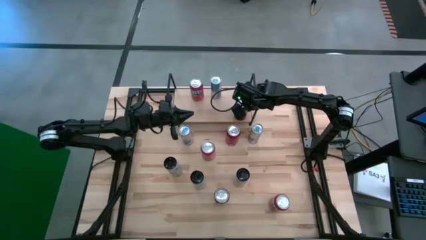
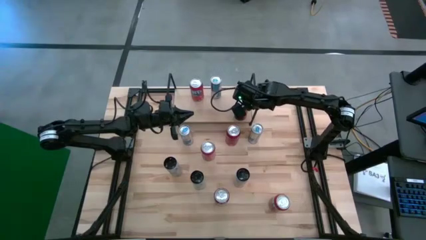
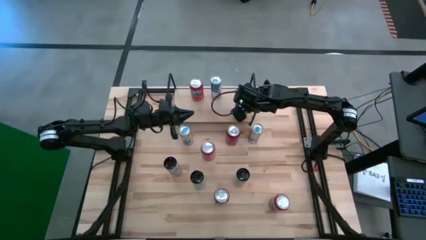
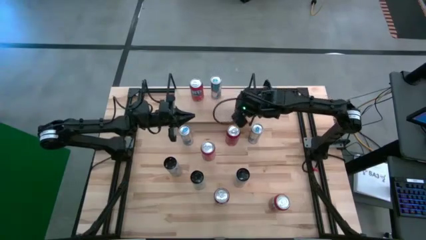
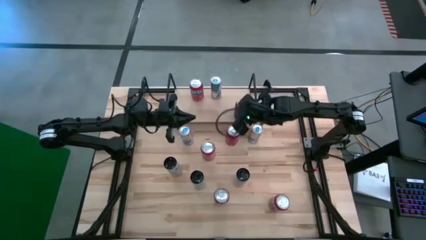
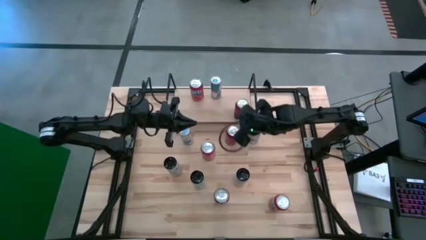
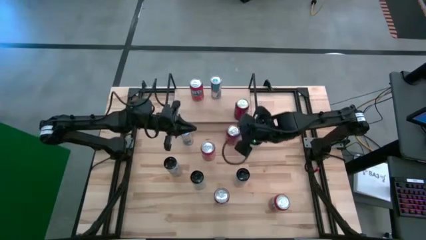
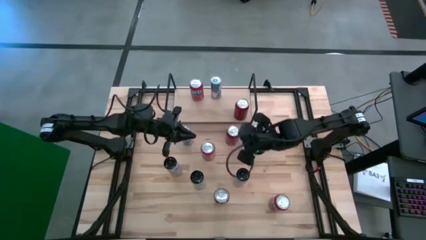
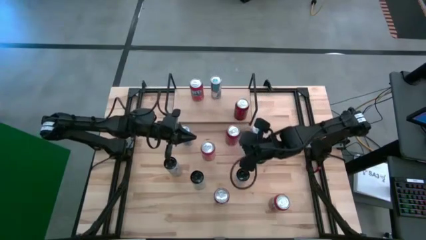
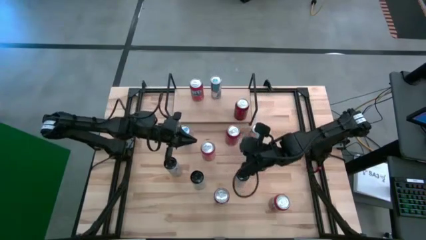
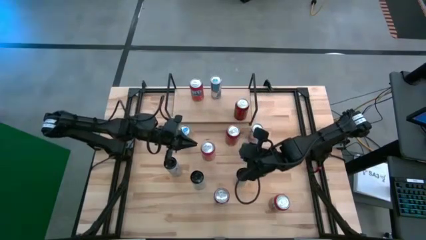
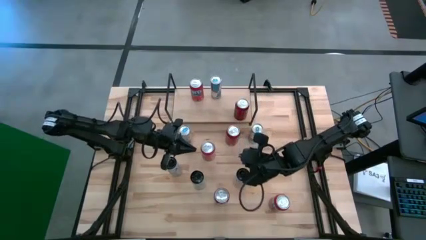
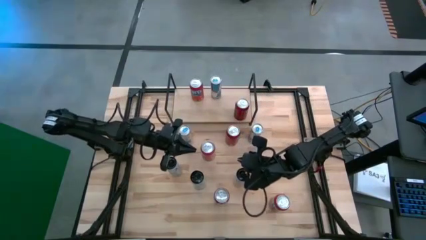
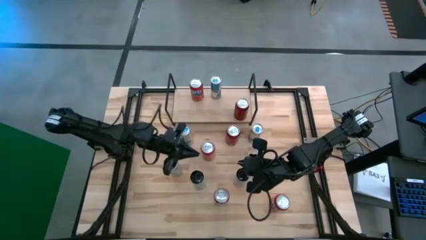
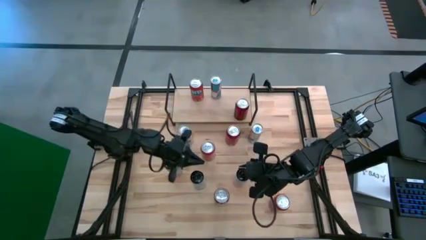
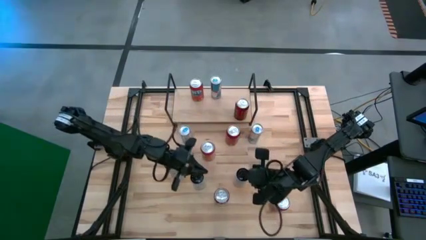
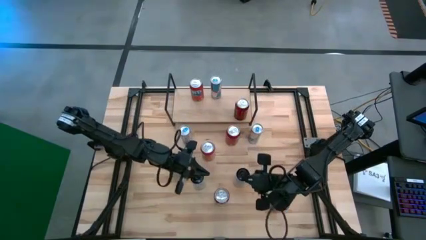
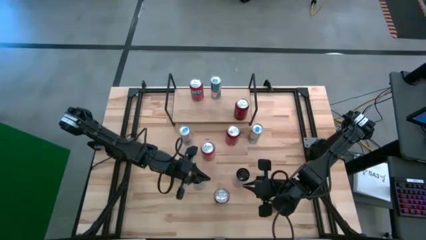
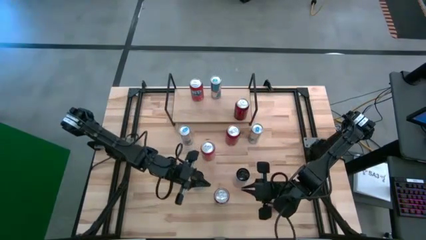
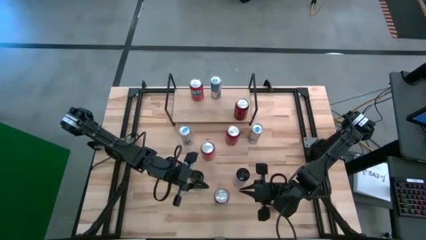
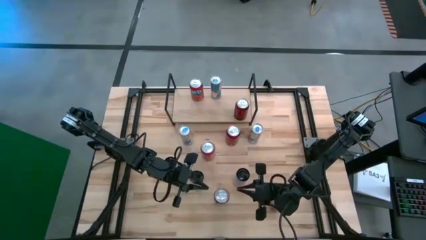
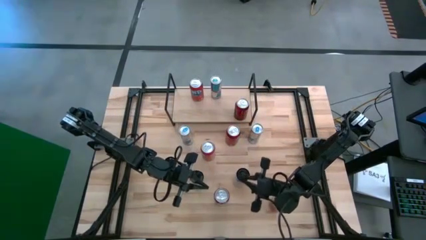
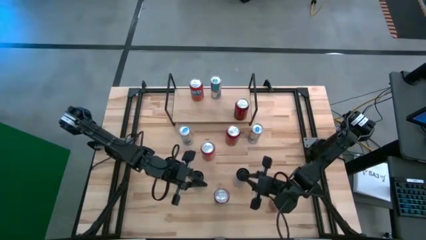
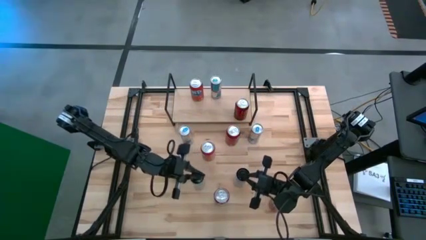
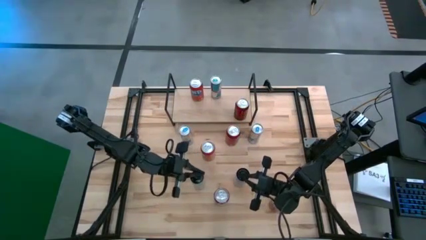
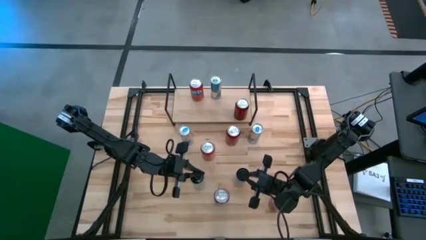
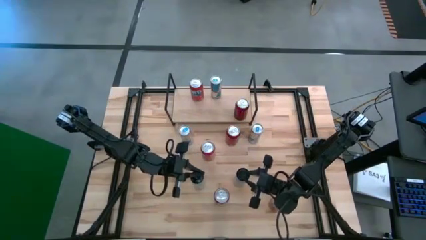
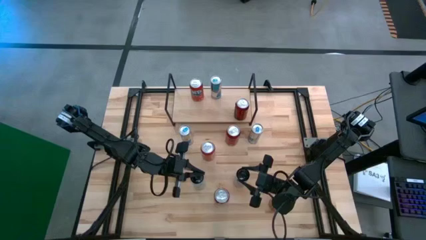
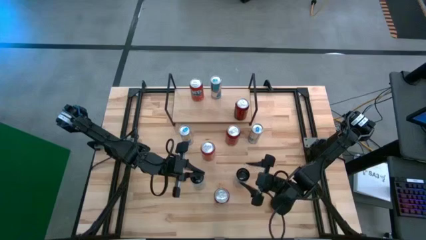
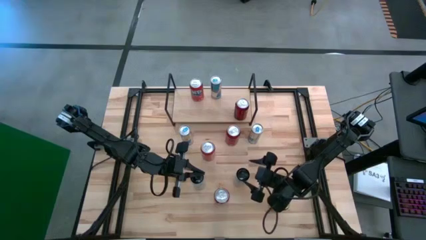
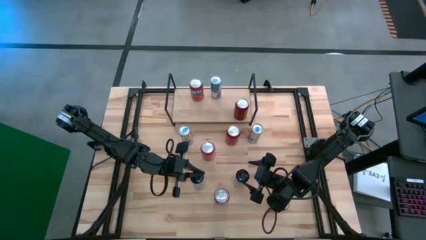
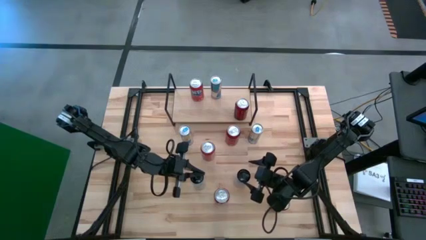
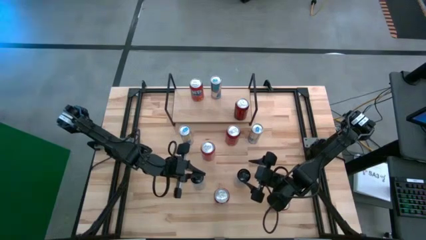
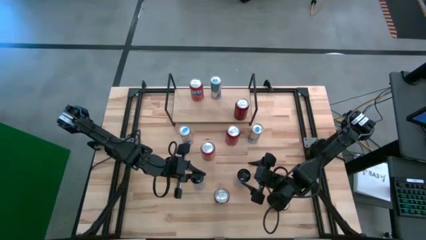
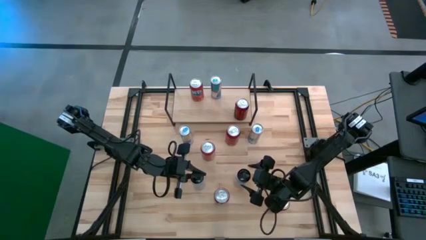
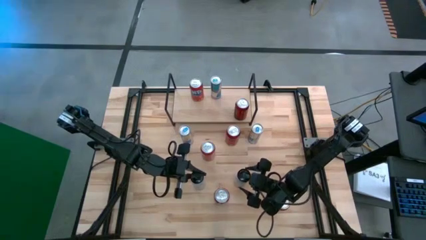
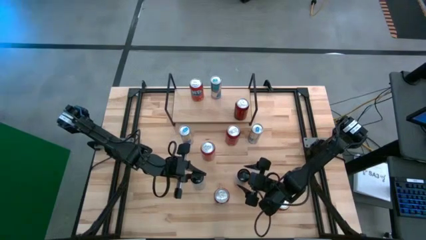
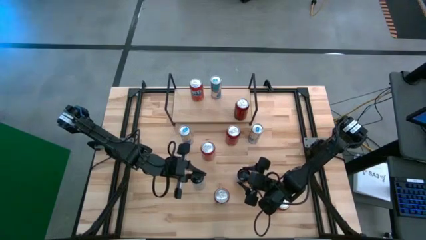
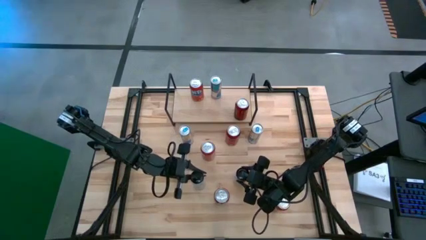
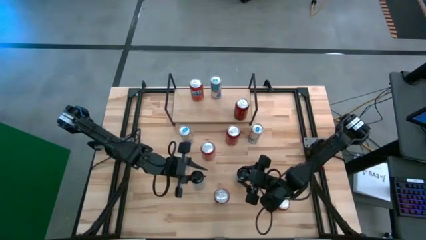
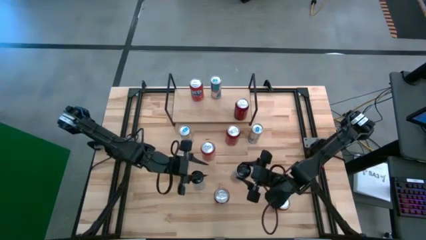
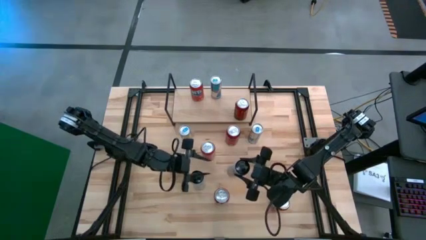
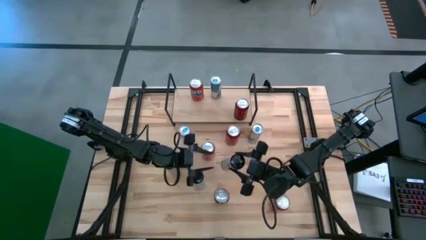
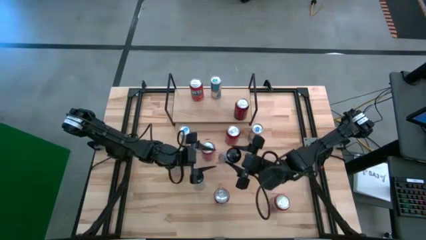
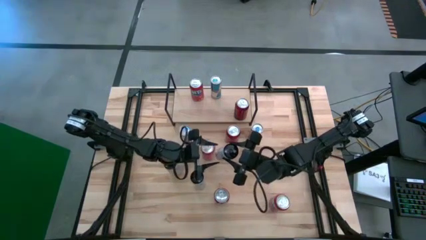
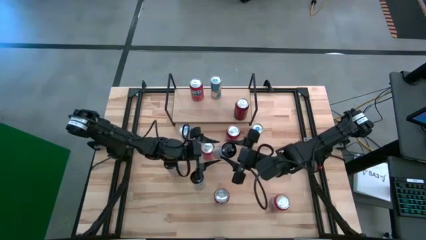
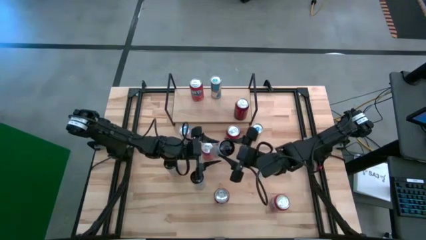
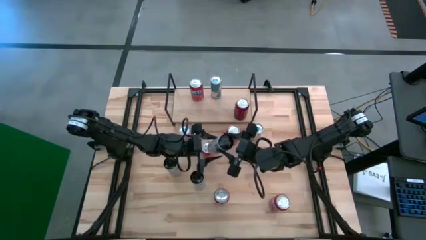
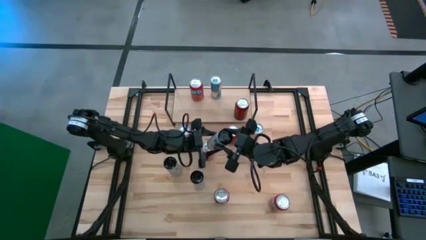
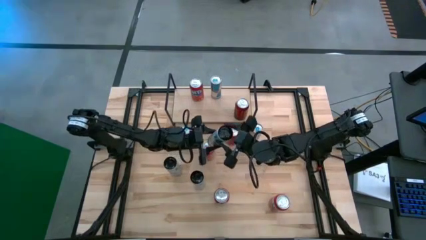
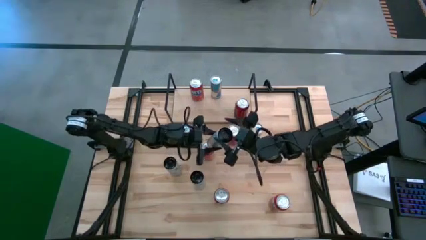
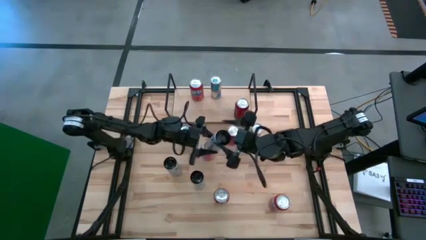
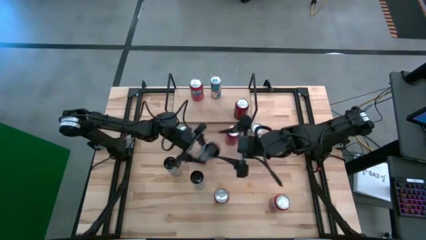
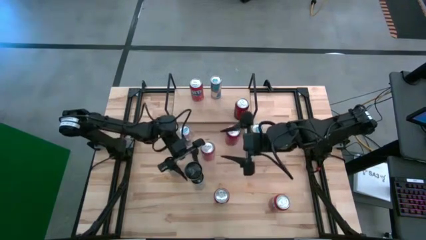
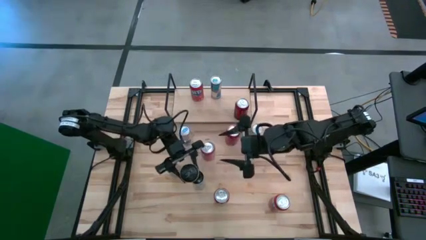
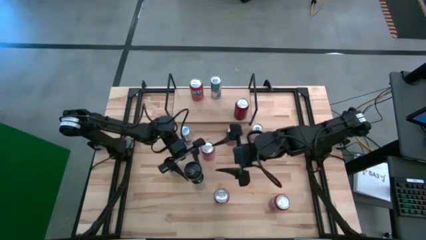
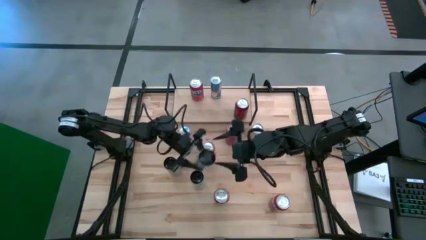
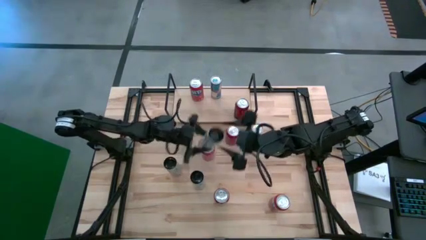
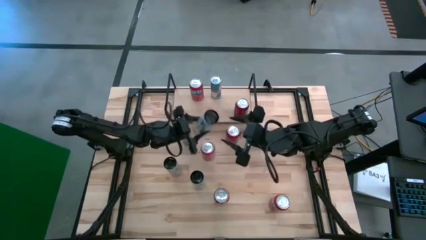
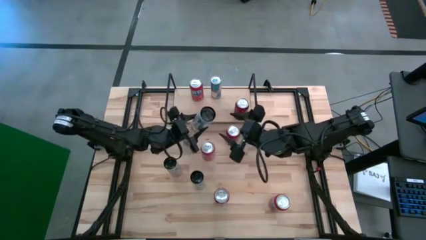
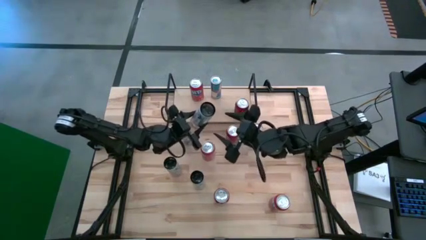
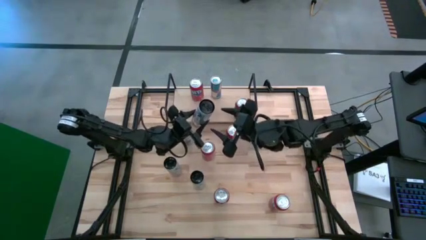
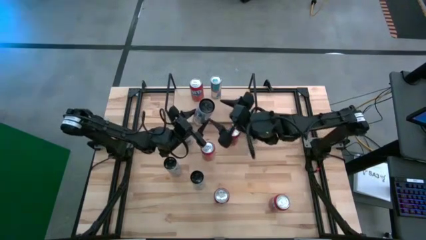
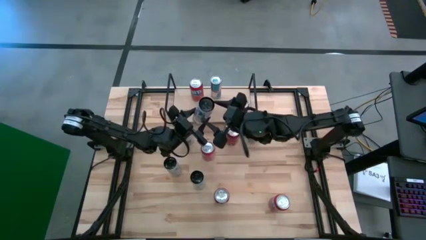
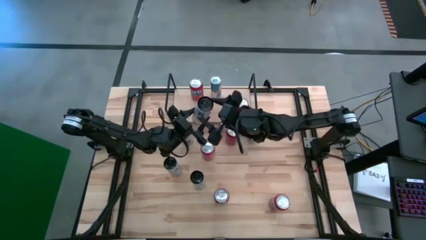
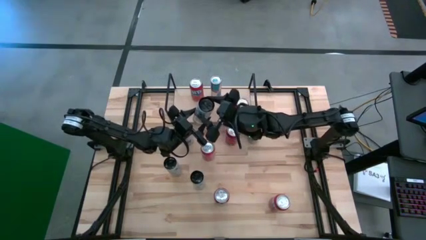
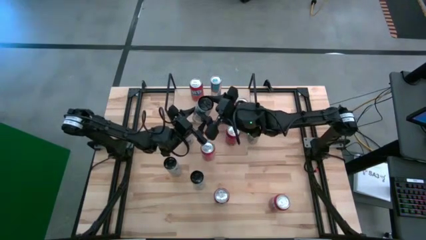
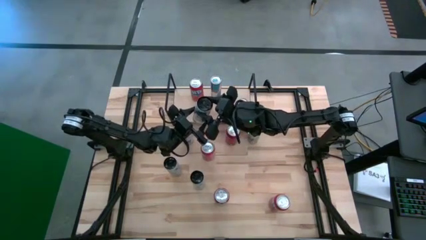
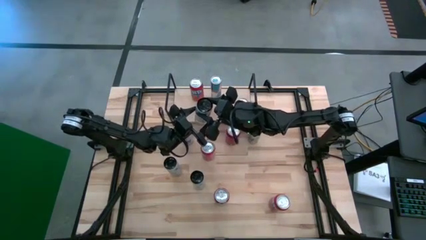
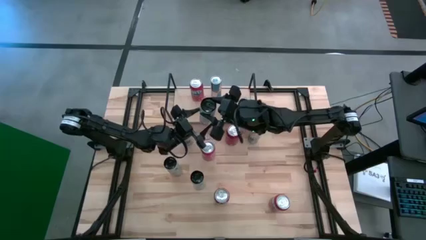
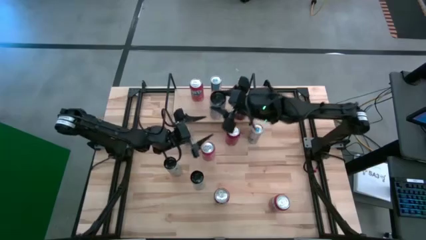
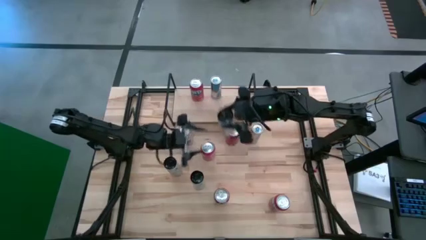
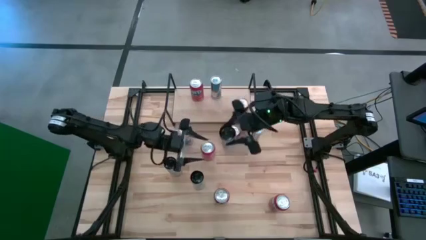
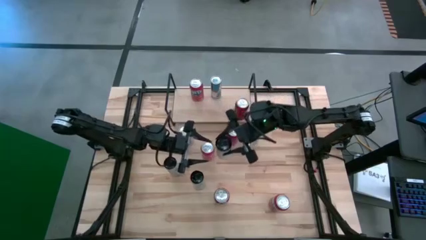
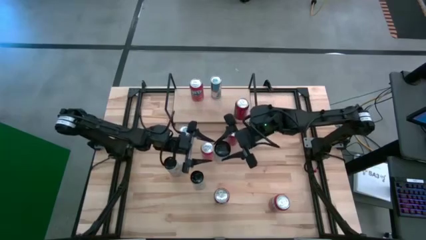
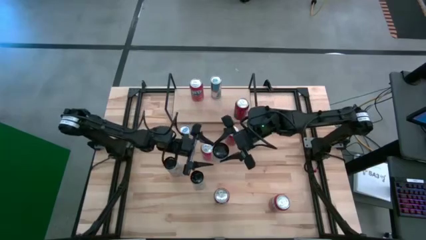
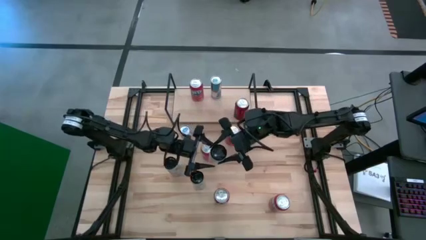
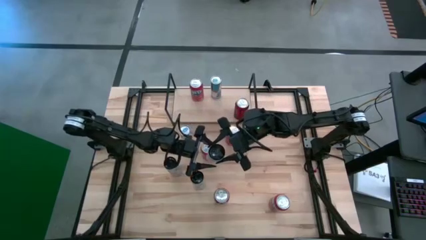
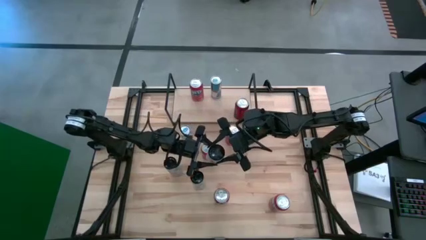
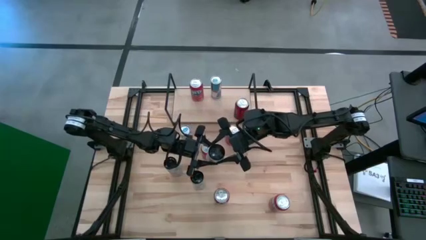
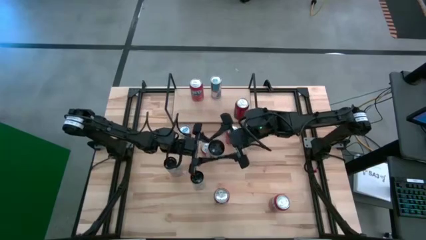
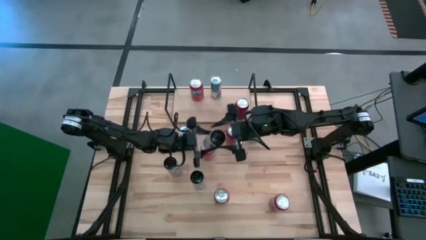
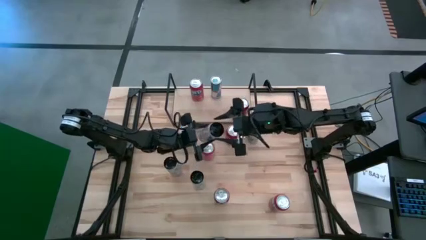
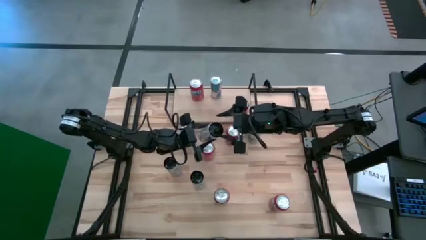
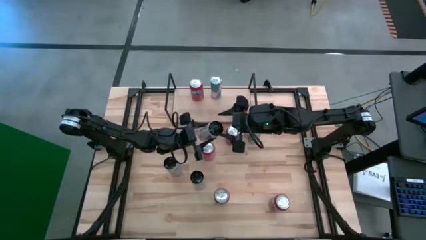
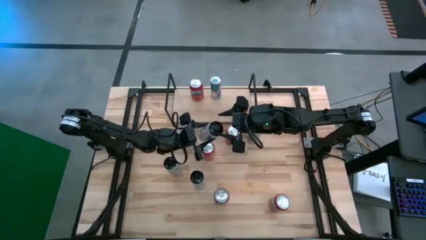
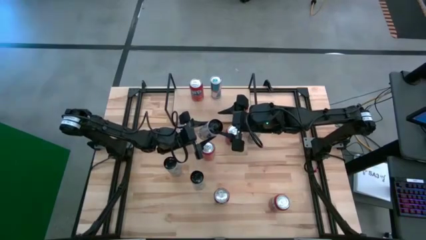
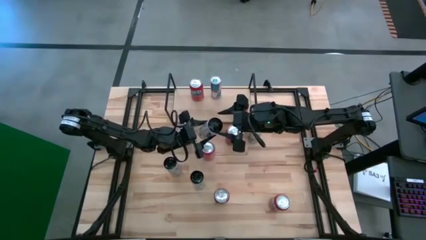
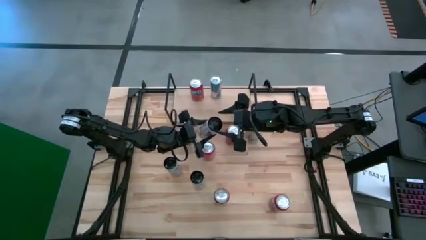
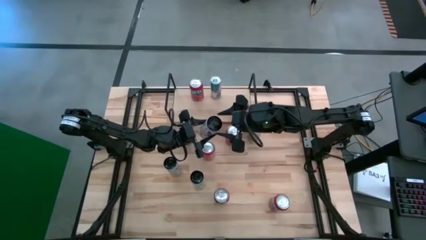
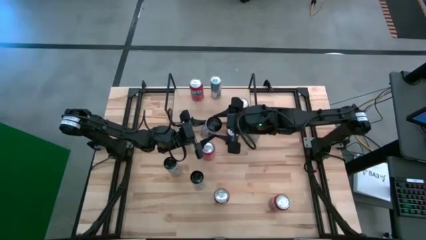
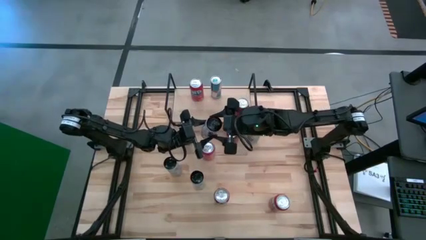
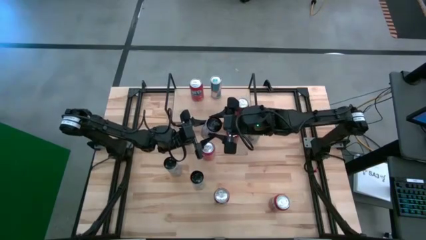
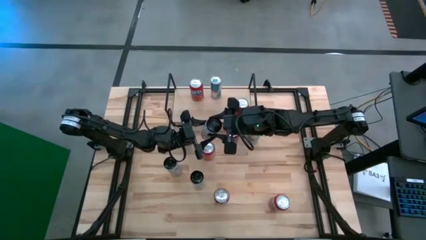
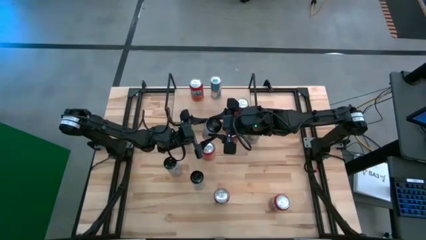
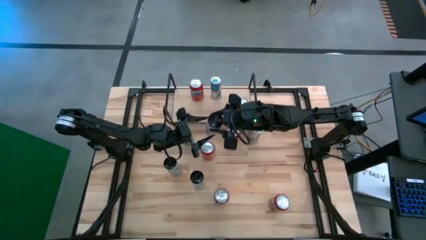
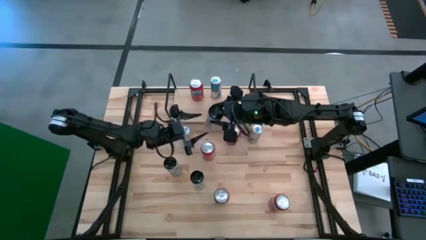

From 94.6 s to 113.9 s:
Task: Place canned beverage on shelf
Put the bottom right white soda can on the shelf
